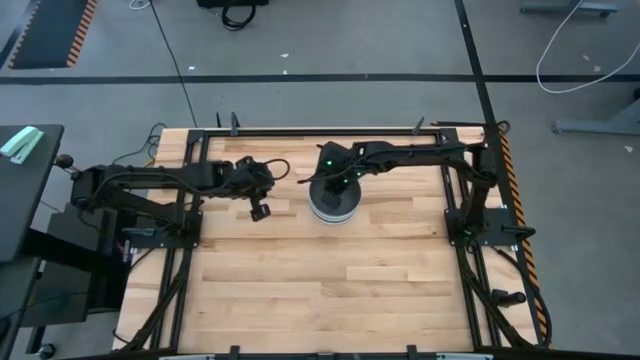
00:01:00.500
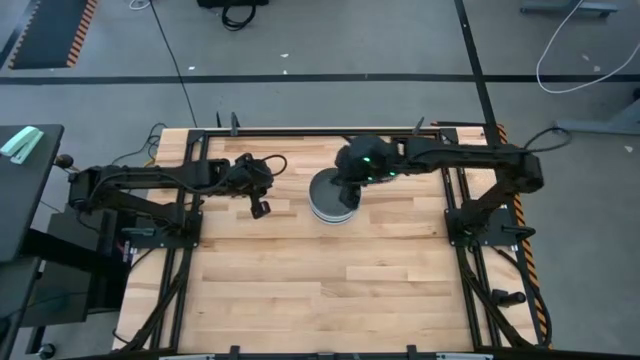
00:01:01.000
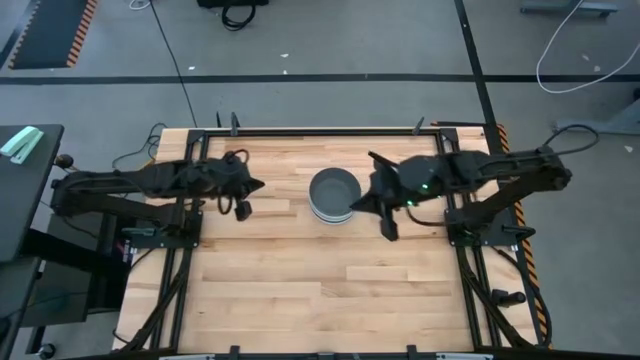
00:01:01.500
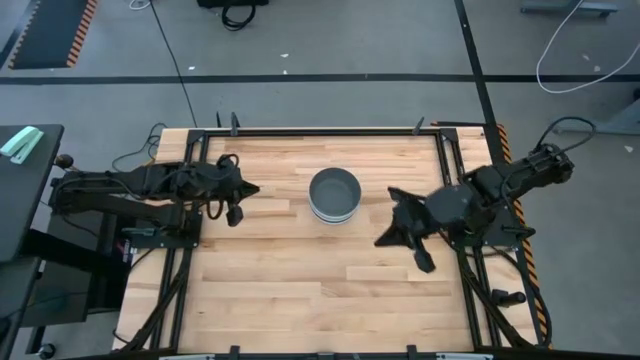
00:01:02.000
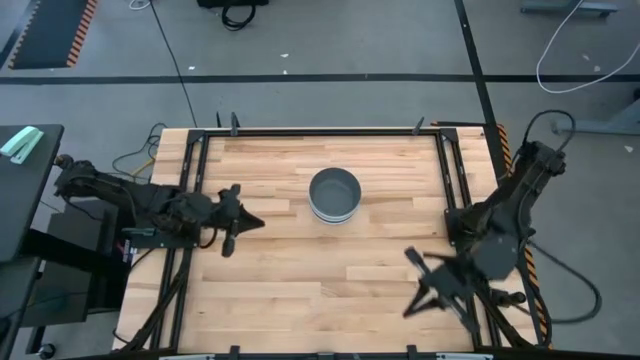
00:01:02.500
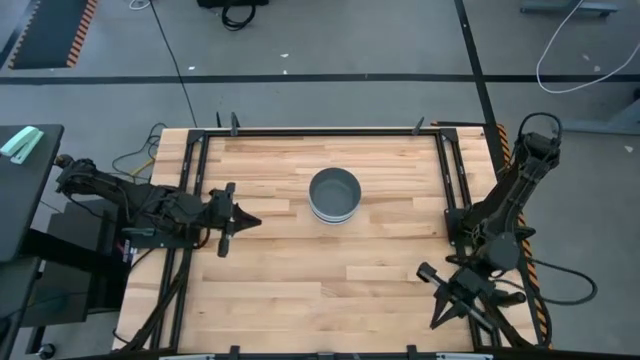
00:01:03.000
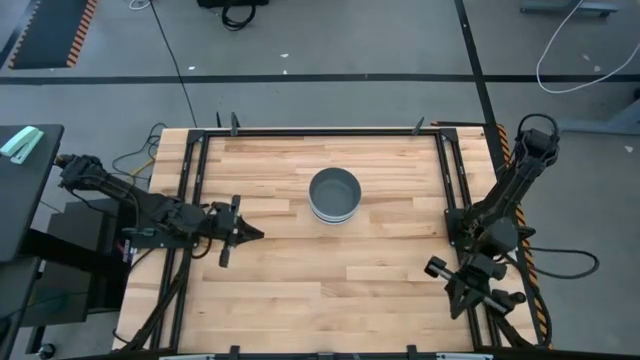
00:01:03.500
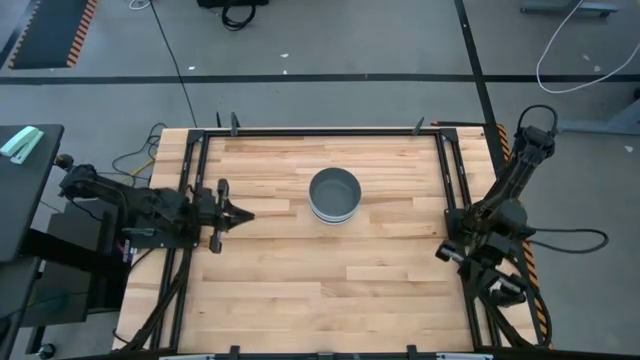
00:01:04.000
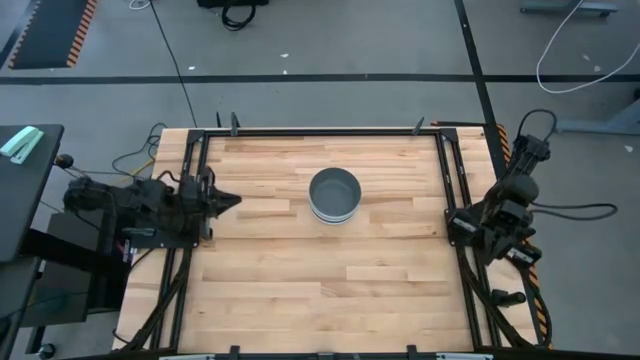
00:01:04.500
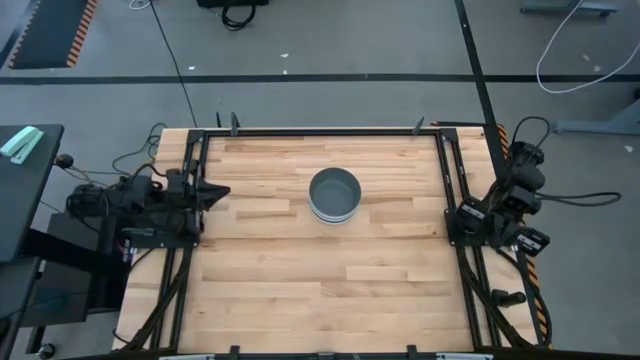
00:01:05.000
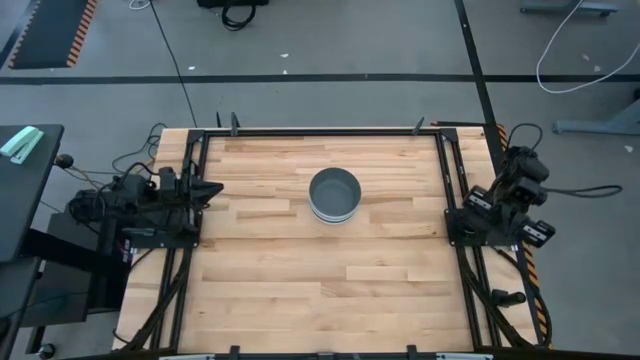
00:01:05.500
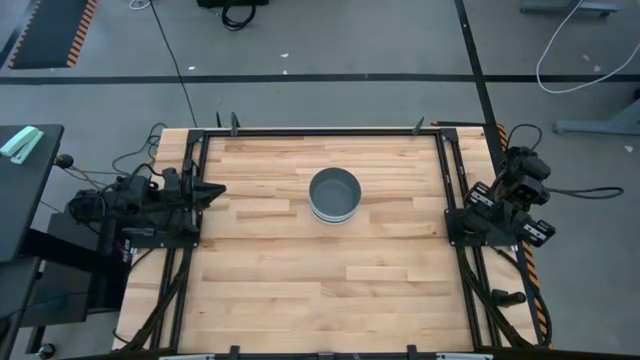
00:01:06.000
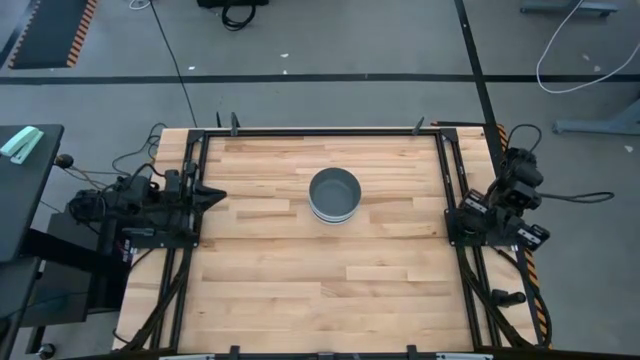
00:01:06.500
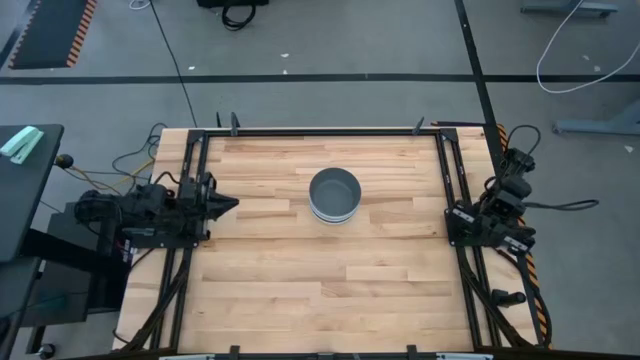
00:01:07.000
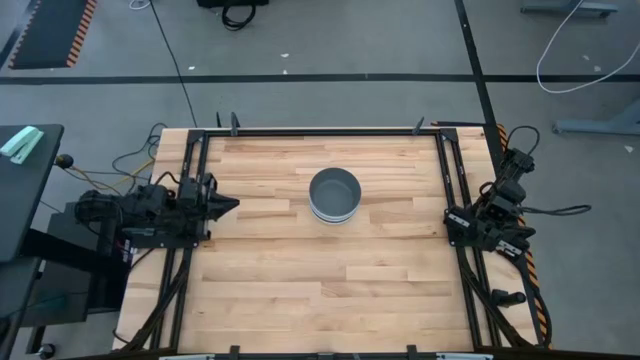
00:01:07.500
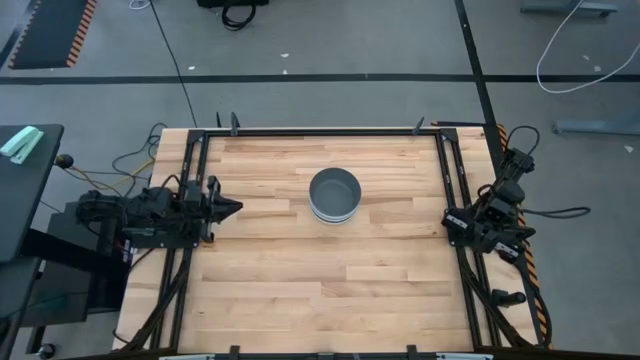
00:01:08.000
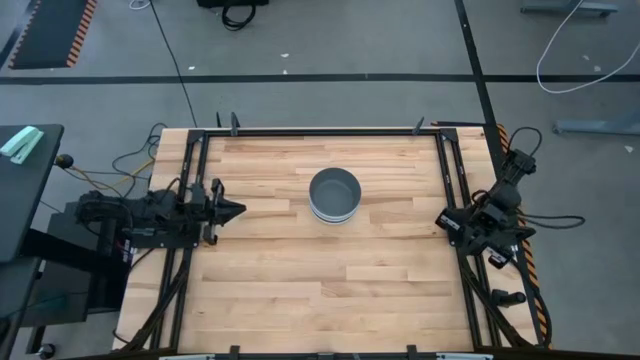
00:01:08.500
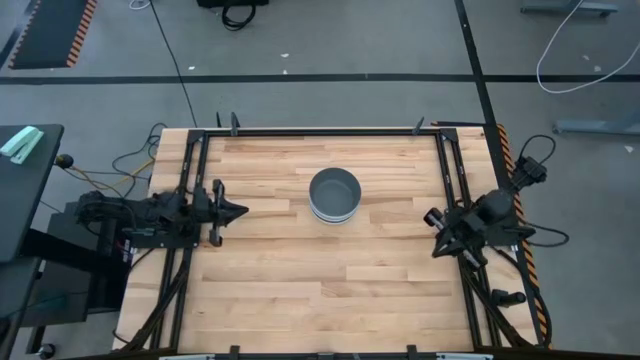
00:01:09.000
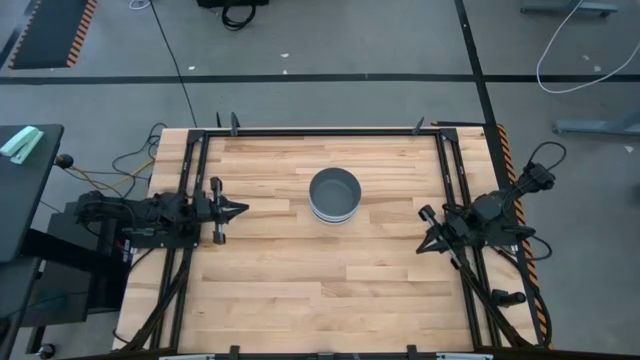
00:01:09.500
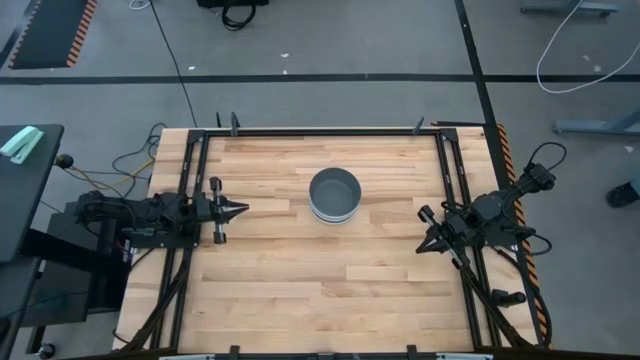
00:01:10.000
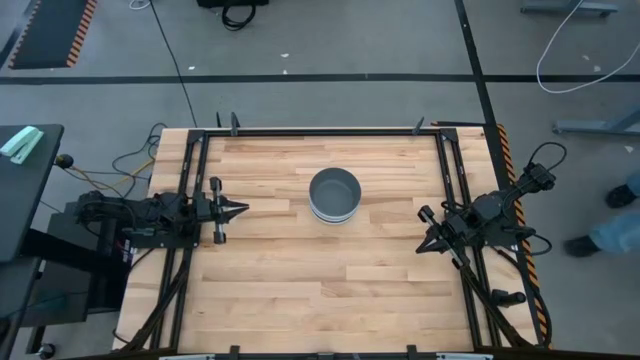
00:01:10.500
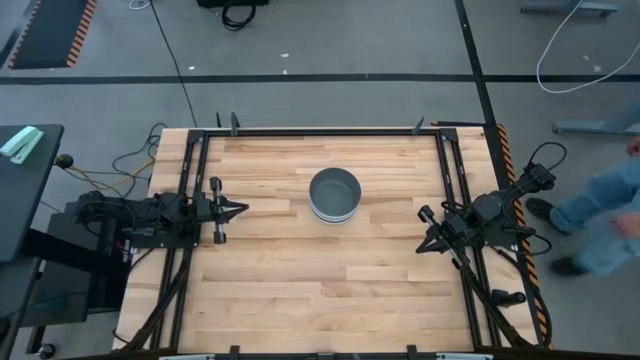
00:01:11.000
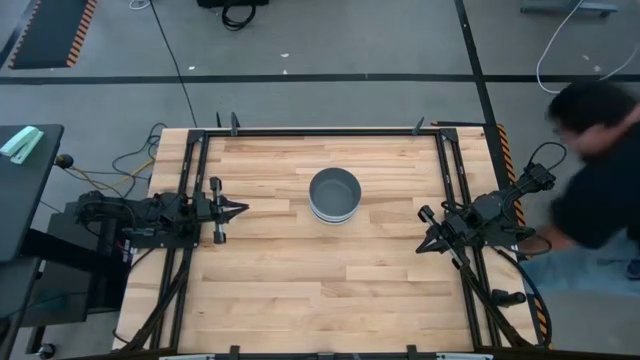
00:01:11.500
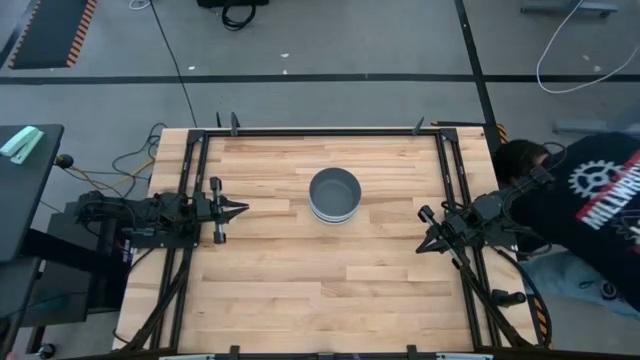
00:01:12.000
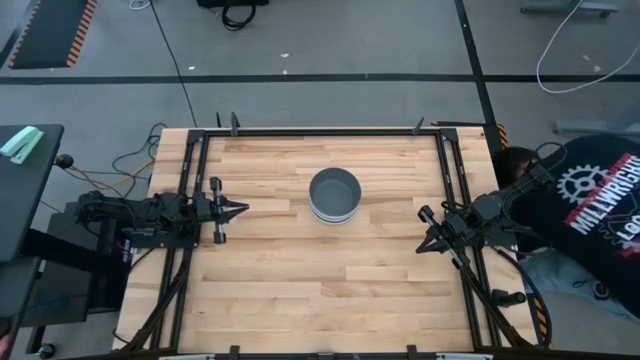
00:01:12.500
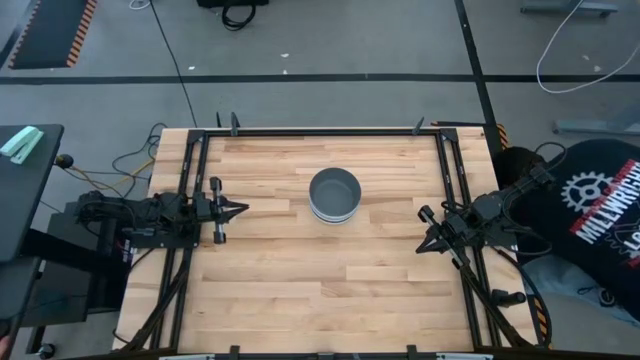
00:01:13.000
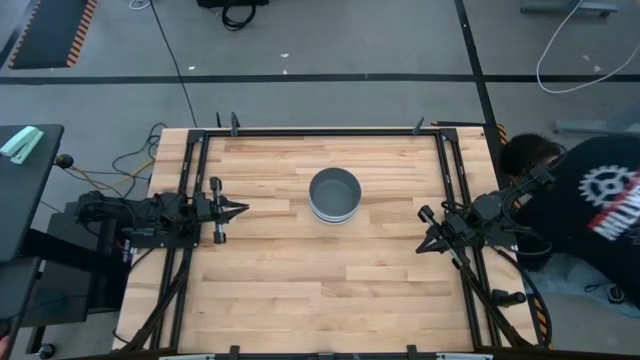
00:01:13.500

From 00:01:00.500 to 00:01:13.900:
Task: Nest bowls inside each other
Return to Home Position

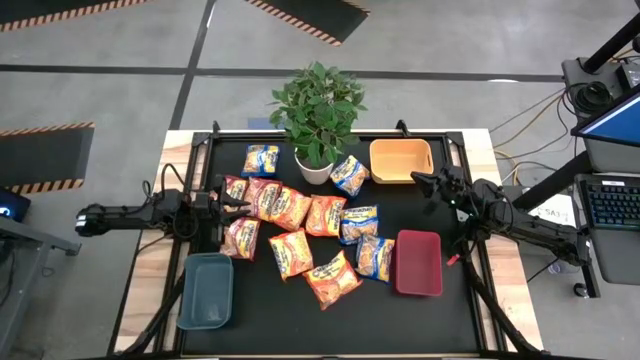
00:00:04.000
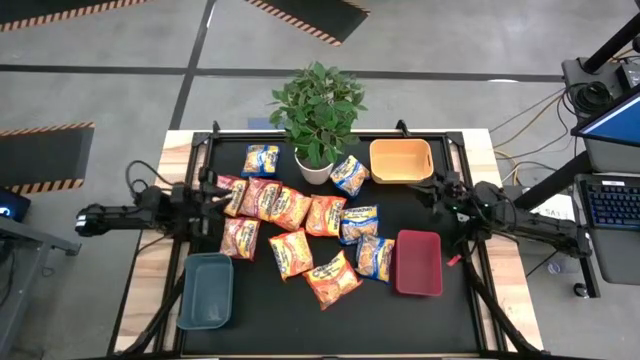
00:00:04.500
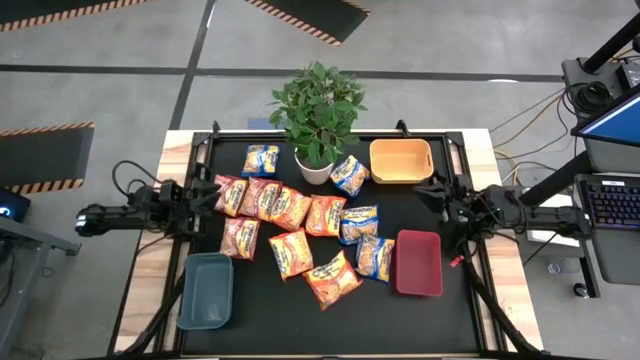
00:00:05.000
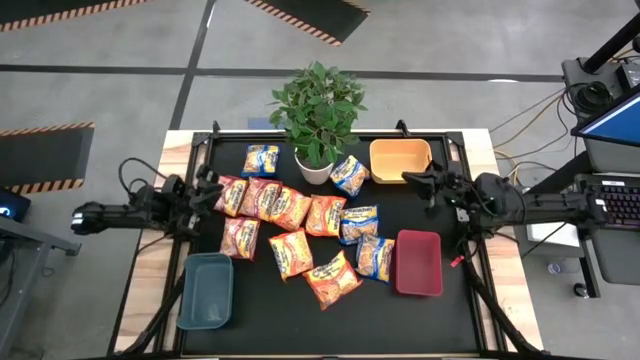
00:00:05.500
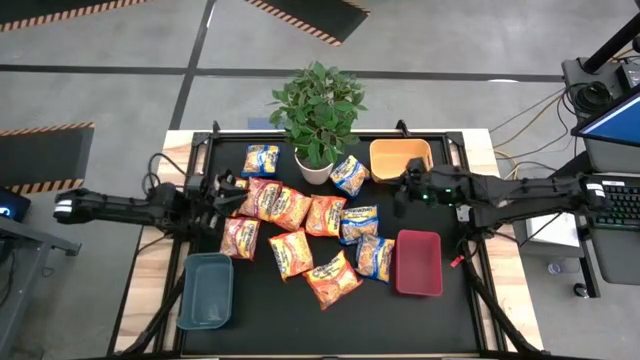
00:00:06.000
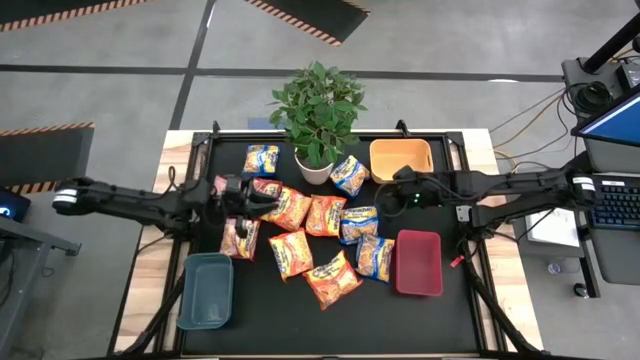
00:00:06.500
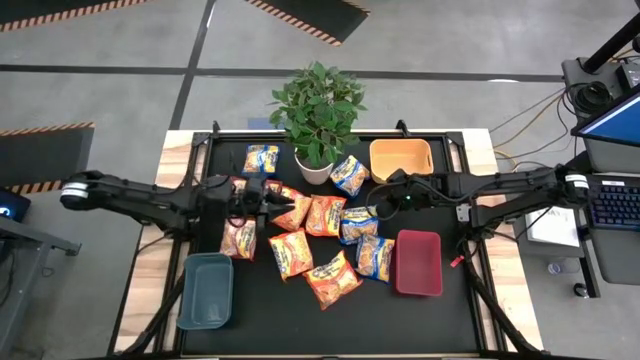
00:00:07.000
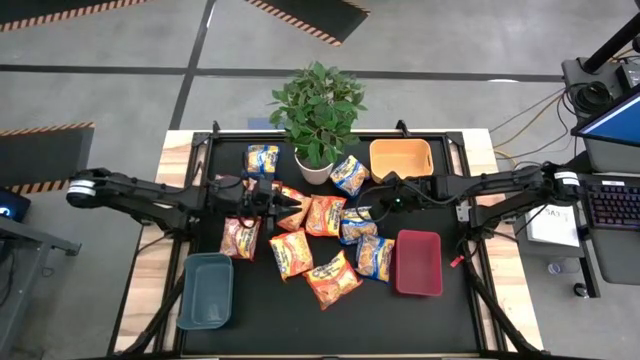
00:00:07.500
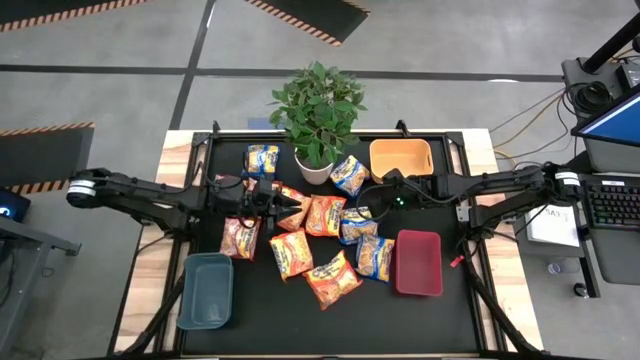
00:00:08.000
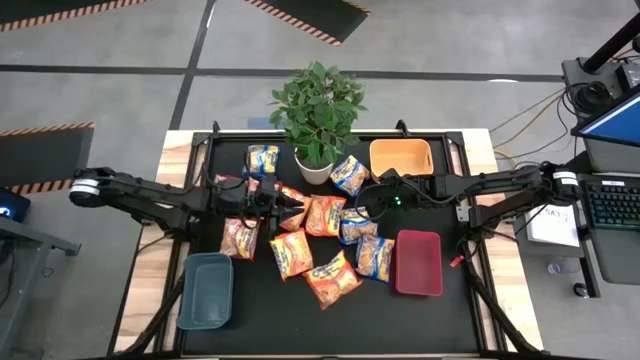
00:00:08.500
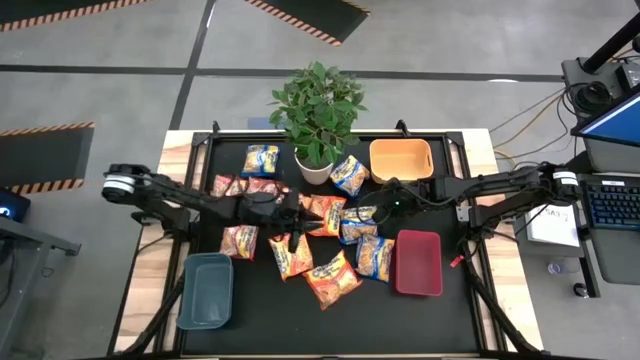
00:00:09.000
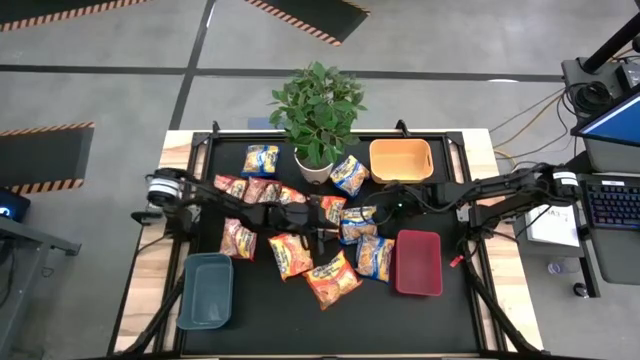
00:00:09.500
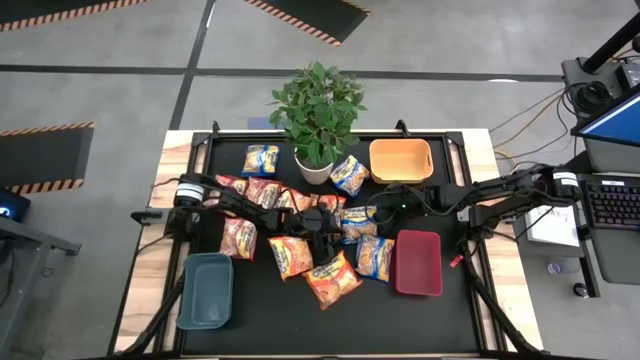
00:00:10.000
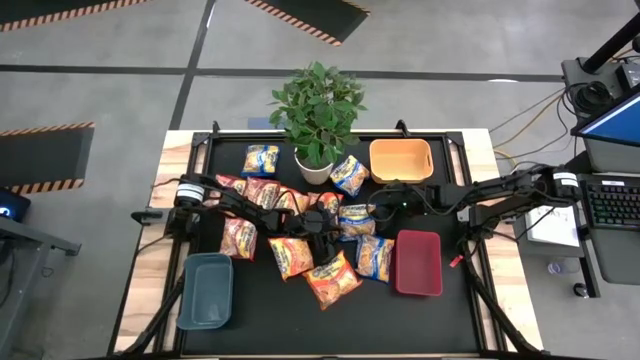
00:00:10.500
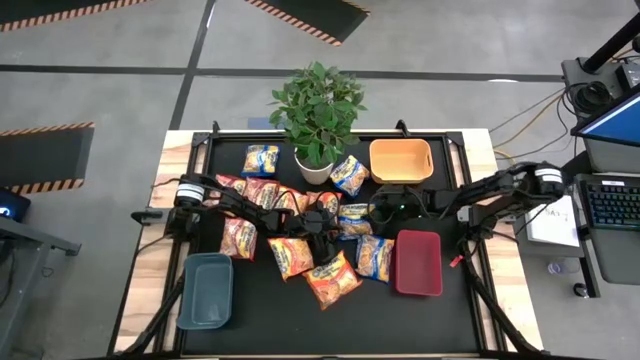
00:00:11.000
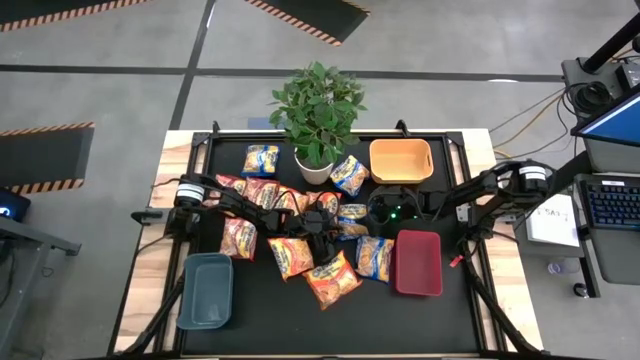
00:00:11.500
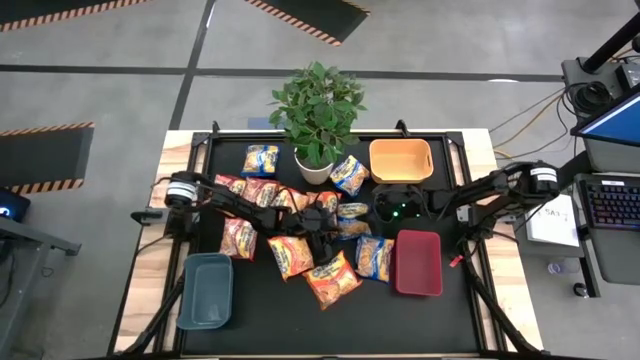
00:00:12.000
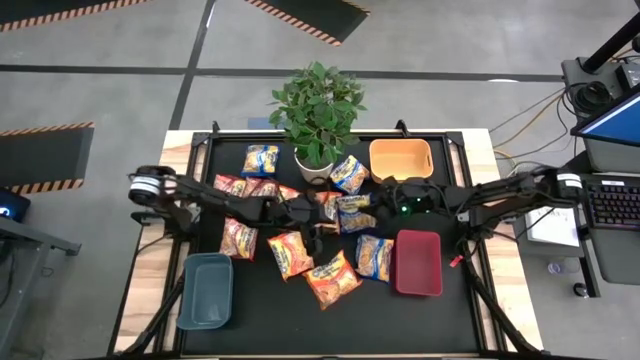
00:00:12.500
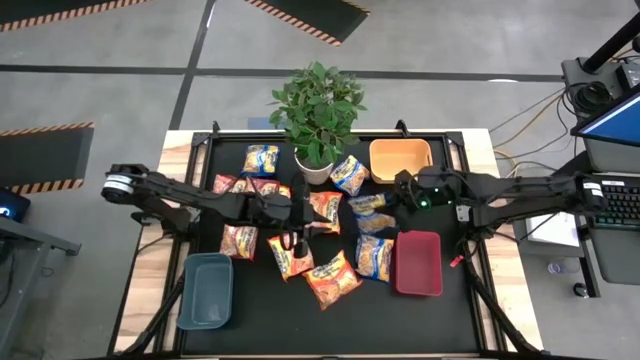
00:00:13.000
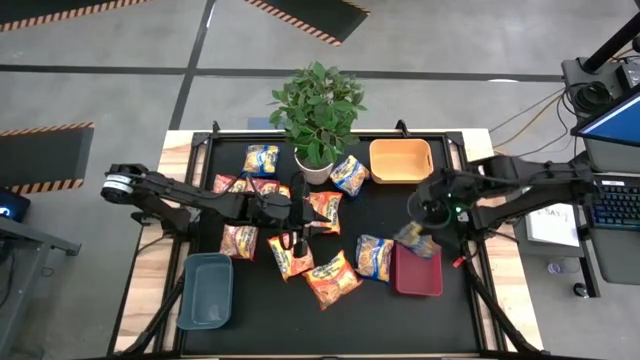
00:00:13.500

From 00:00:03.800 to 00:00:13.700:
Task: Sort Maruchan noodles
Put the blue noodle pack into the pink bin
